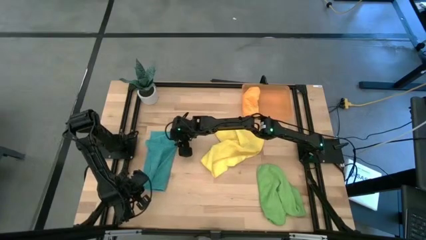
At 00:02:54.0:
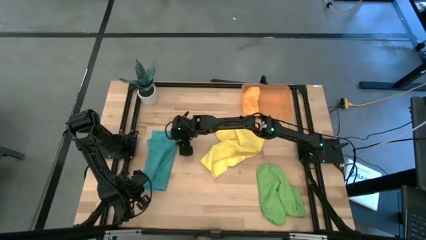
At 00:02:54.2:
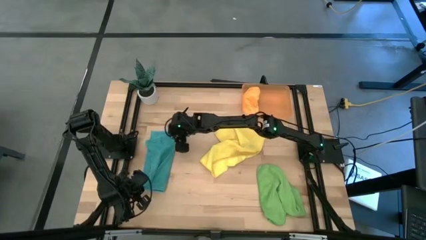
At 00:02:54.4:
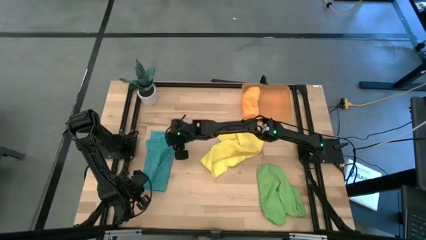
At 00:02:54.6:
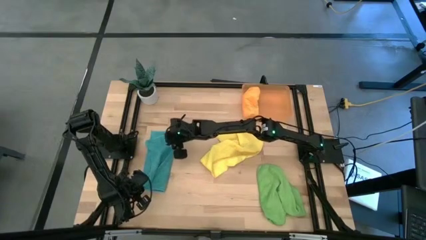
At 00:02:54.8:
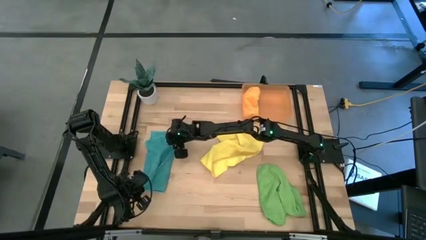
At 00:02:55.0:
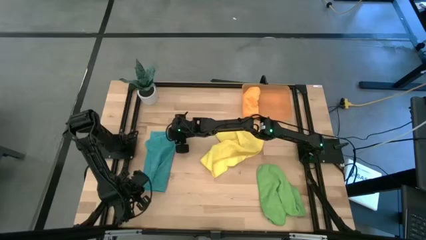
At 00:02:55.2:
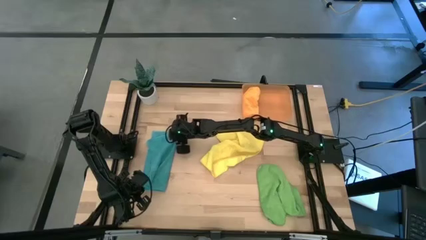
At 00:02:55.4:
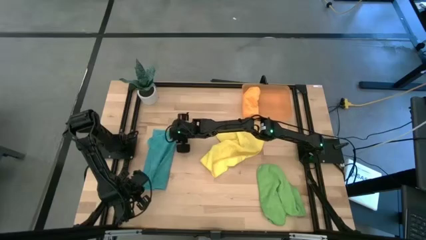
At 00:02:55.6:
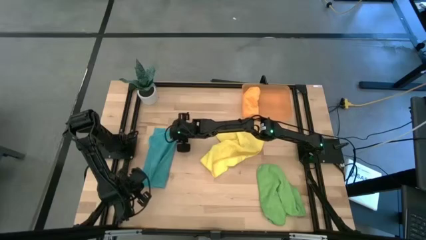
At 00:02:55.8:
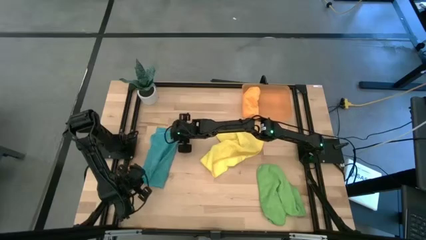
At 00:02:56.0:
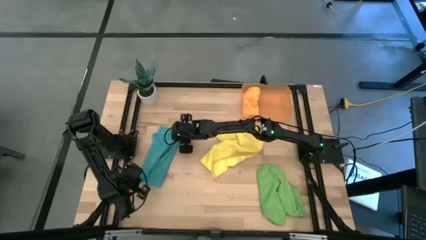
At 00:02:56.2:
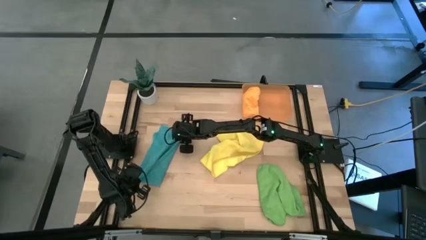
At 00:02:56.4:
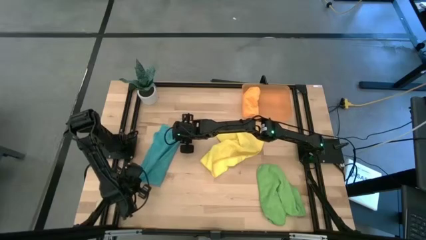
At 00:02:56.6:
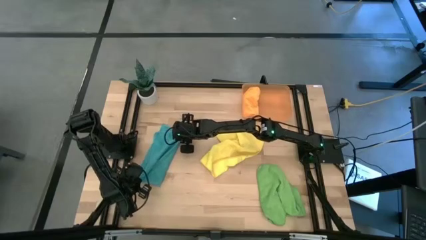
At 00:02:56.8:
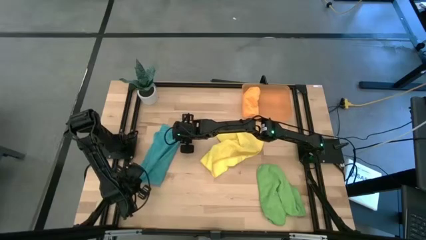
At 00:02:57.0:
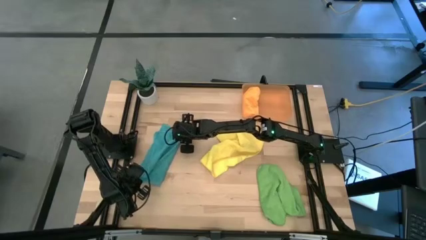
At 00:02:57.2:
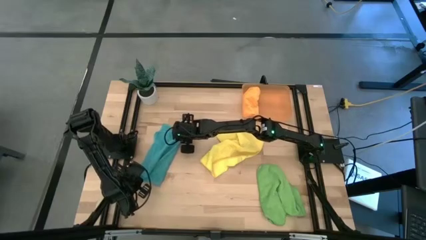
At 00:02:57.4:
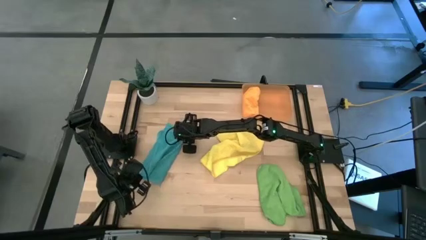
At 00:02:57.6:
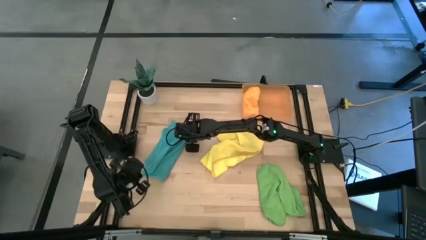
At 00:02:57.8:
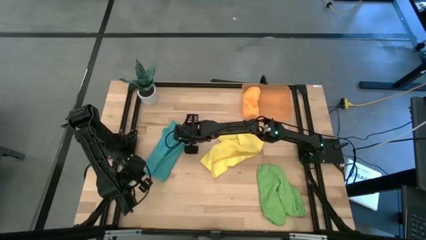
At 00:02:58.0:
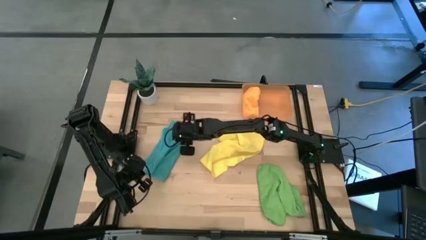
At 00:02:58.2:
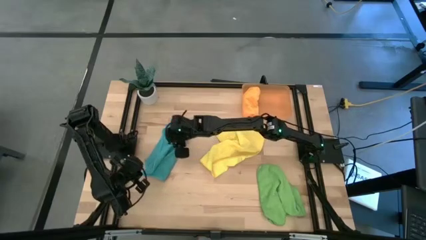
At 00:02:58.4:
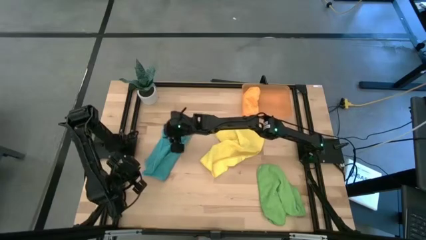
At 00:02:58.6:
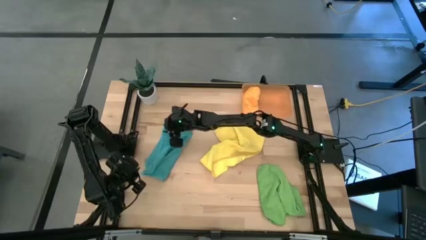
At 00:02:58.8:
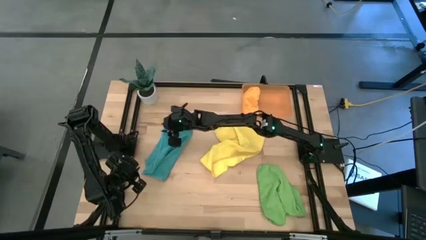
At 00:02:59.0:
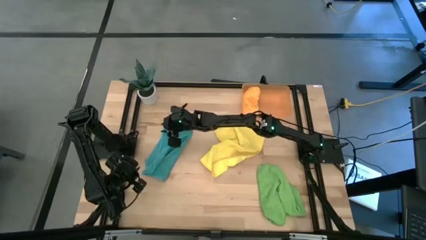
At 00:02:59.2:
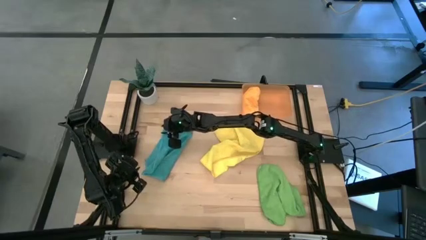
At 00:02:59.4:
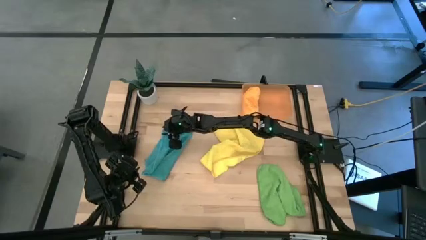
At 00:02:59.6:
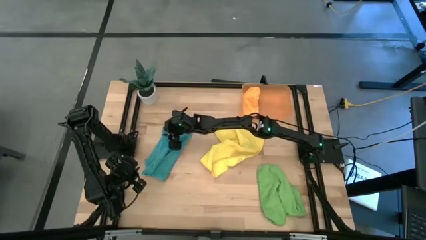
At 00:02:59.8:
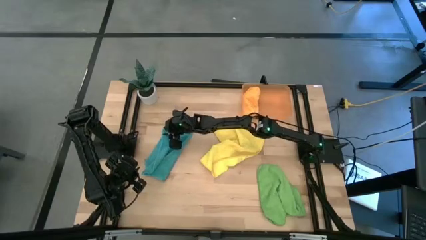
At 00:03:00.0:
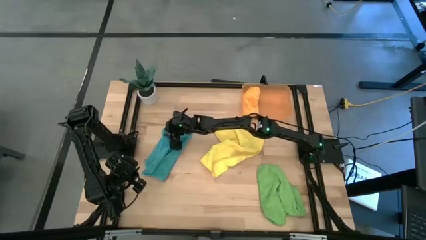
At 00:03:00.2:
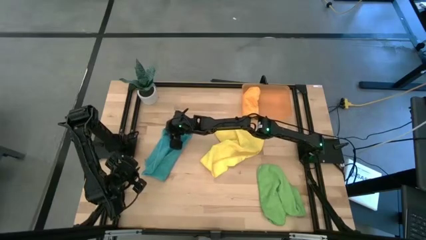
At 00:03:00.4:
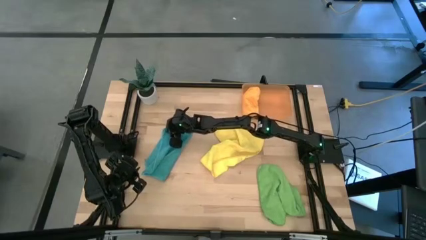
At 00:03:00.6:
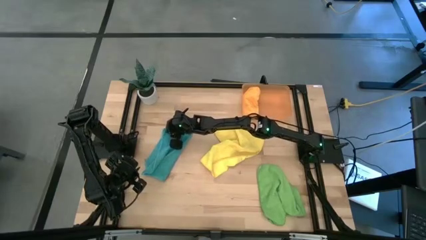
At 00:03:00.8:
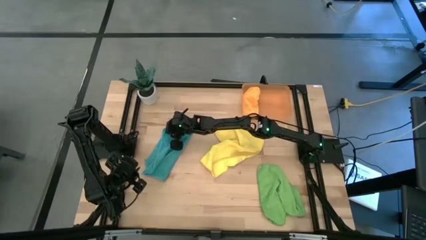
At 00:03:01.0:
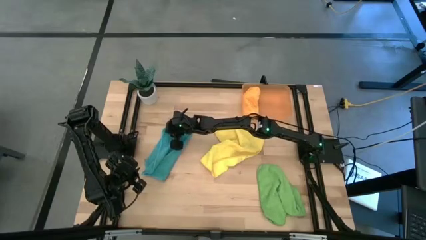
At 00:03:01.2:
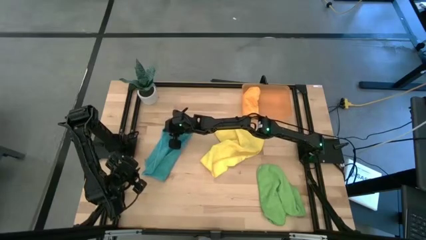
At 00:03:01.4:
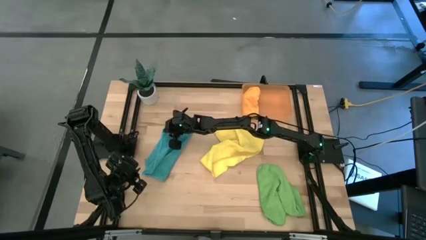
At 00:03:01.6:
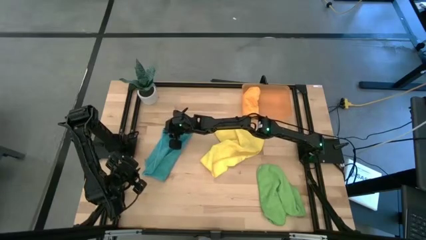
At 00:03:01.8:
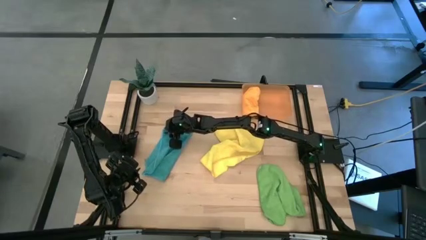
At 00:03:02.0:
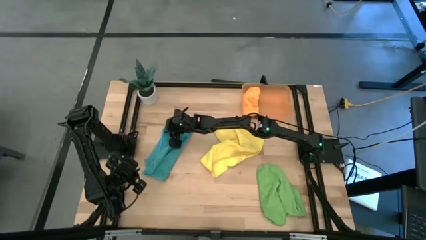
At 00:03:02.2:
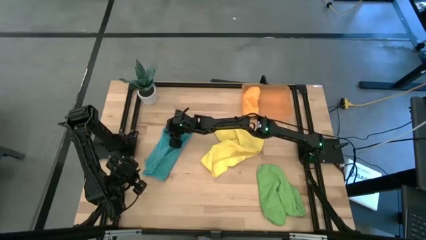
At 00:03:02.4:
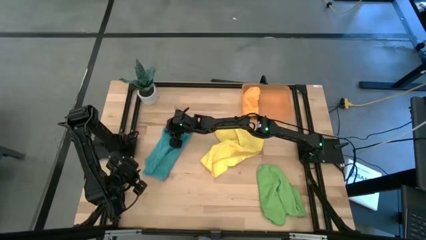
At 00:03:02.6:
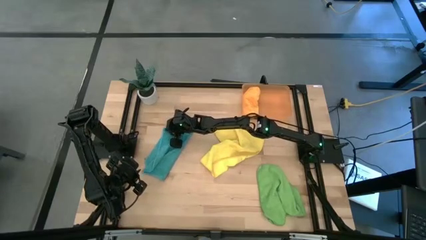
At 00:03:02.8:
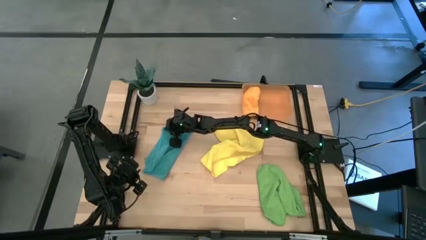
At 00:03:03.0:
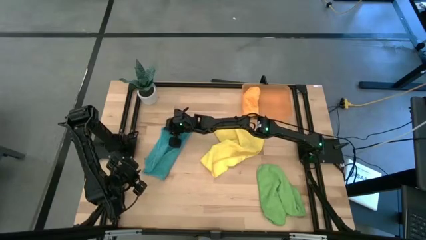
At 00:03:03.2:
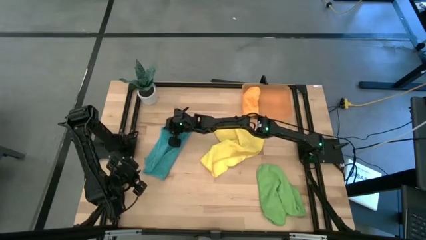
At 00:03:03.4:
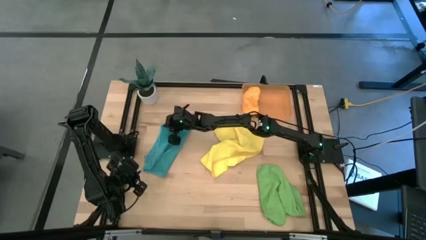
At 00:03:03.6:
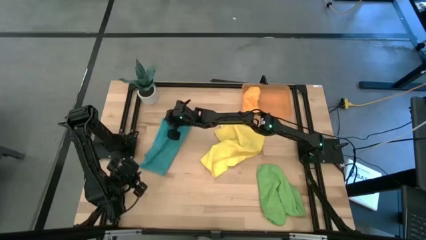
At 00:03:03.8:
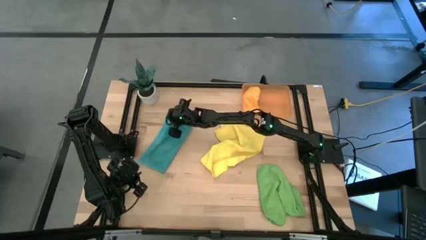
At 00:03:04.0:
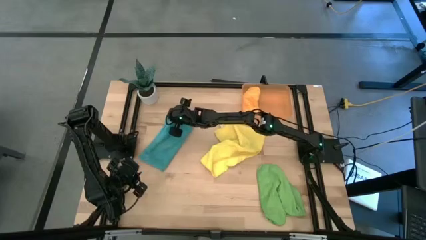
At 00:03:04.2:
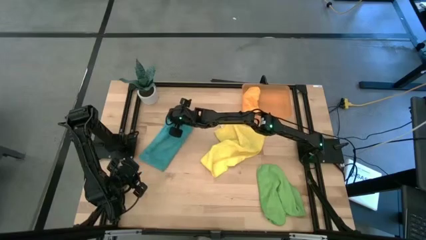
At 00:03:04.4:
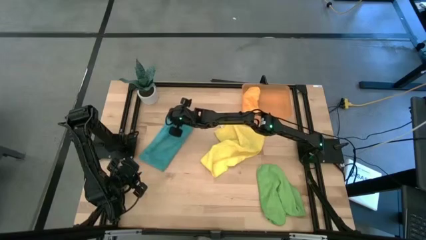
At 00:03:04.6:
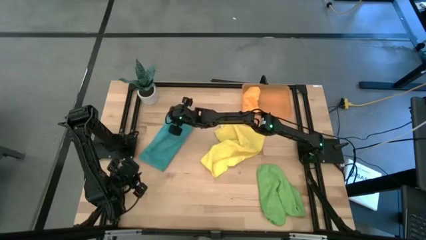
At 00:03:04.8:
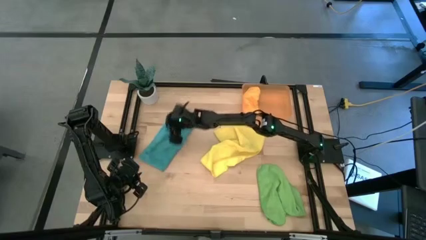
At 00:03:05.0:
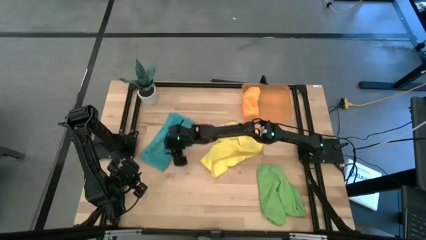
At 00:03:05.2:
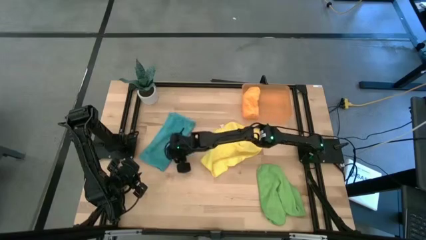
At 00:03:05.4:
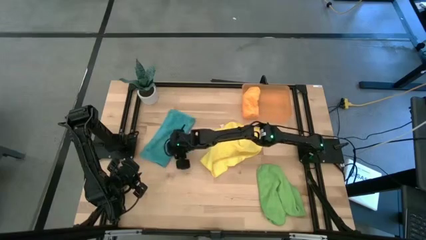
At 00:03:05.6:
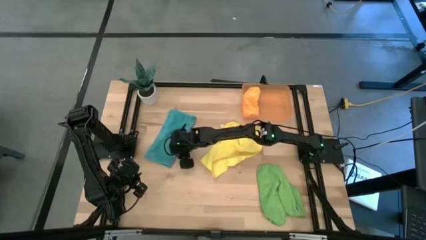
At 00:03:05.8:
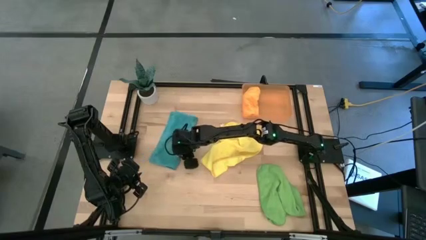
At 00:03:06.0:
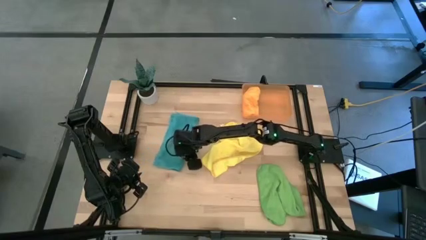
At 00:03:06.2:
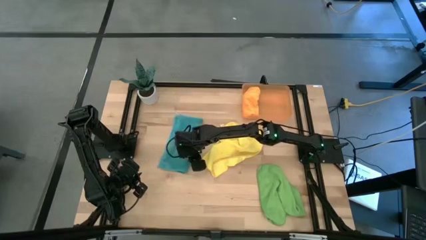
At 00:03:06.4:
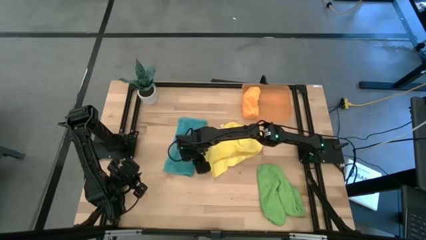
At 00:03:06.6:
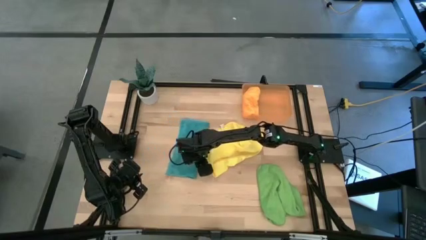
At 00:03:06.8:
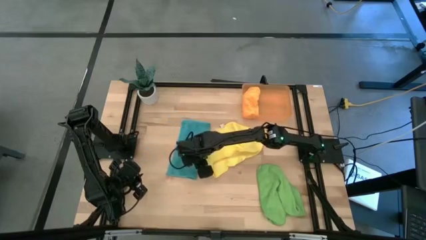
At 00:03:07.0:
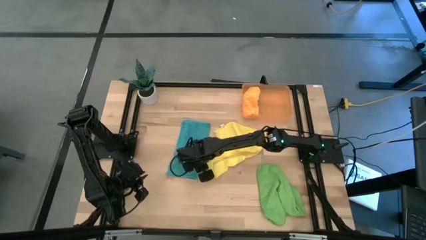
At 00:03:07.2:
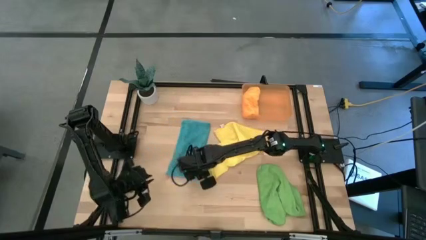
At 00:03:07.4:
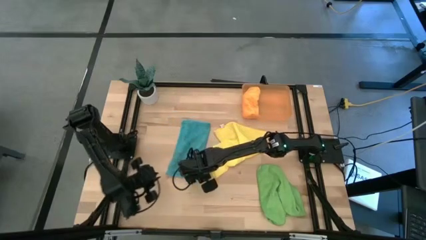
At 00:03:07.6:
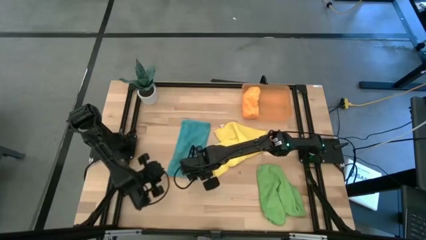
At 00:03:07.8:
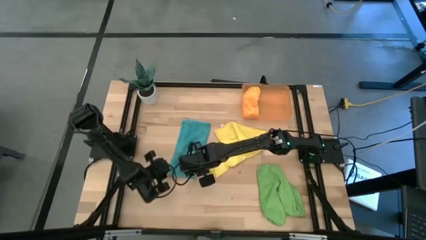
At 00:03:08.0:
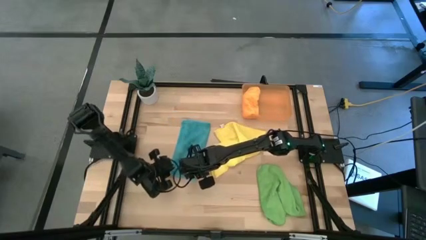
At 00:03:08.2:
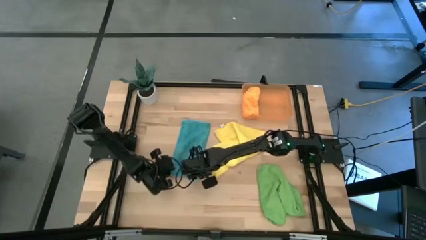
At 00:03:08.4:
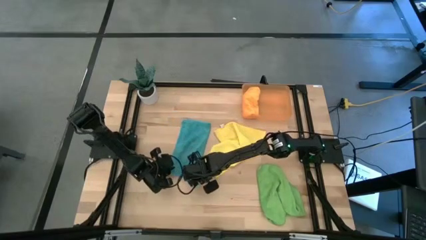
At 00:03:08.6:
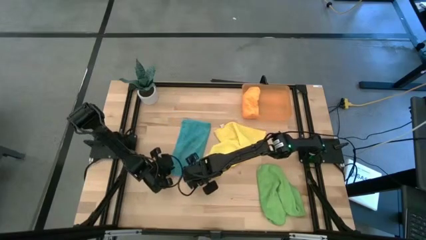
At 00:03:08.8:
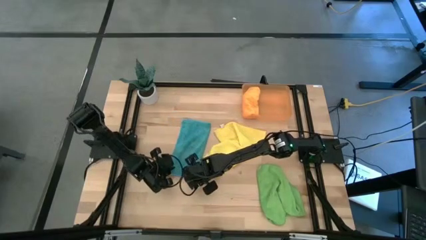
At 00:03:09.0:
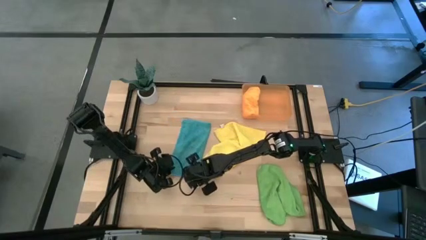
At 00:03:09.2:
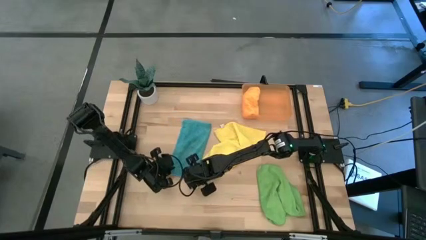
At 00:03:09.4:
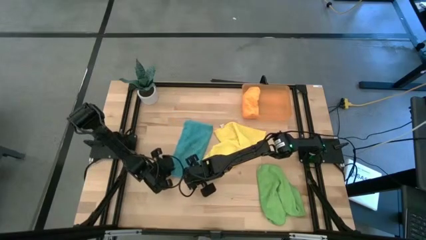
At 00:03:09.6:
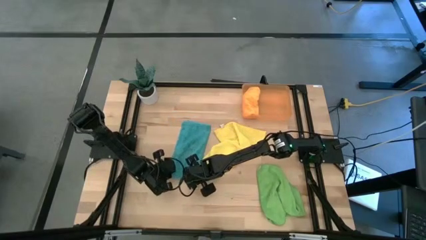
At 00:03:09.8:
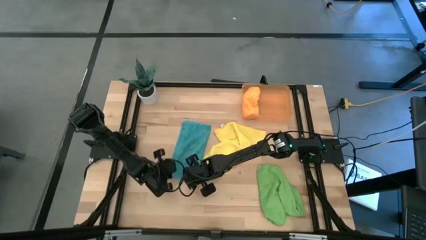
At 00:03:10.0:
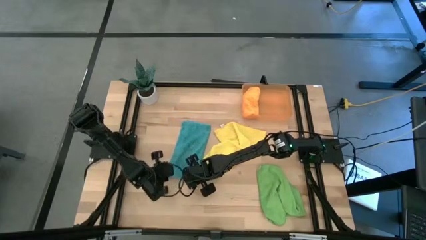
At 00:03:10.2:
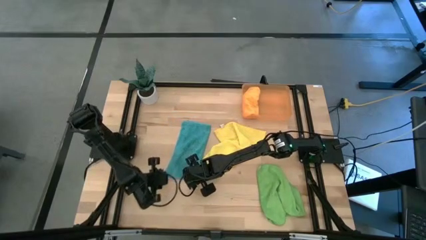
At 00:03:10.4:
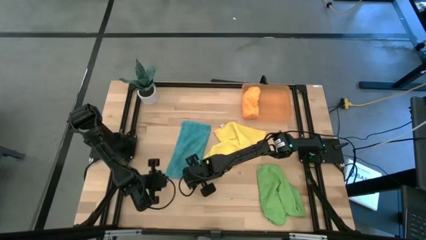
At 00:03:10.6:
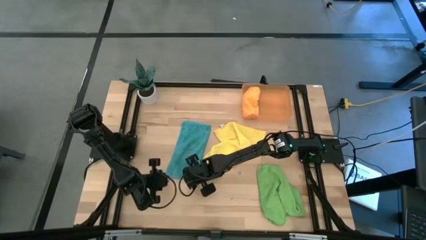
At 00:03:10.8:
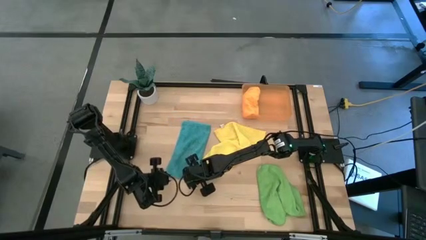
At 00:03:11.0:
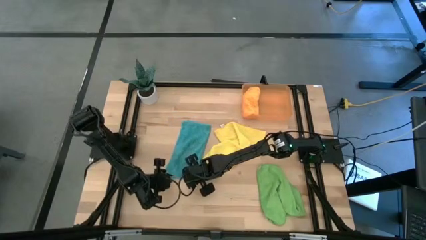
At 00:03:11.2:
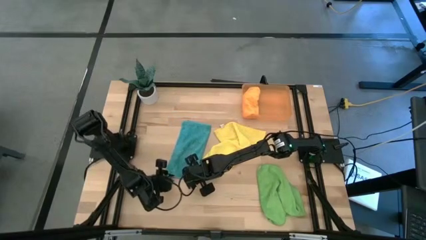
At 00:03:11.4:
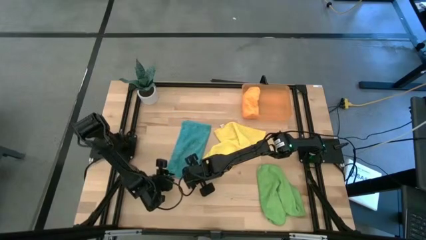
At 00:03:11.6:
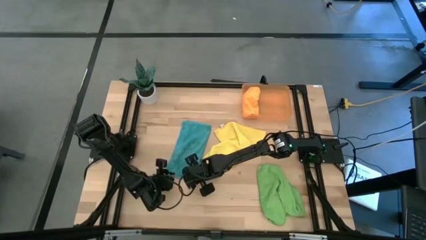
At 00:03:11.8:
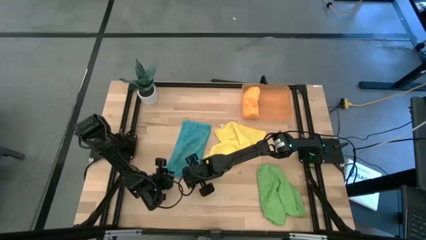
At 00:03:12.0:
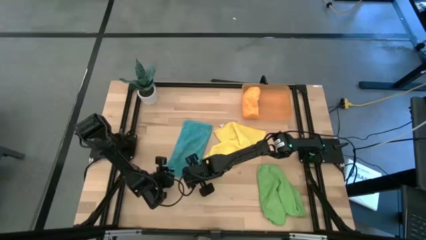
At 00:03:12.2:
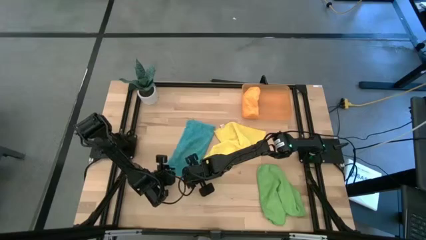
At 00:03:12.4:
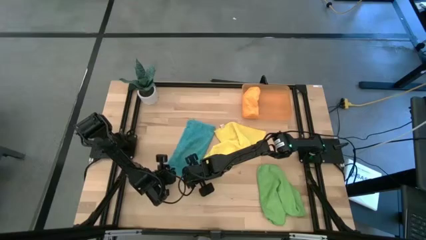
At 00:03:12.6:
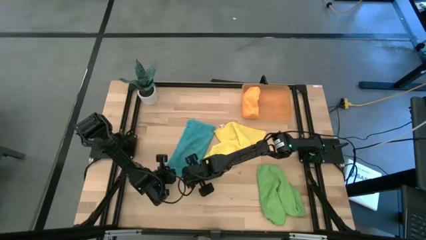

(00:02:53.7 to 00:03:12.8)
Task: Roll microfiber towels into tight, uniform cylinder then place into a basket
Roll the blue microfiber towel
